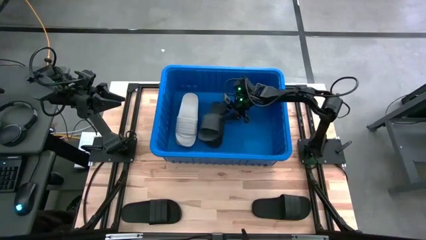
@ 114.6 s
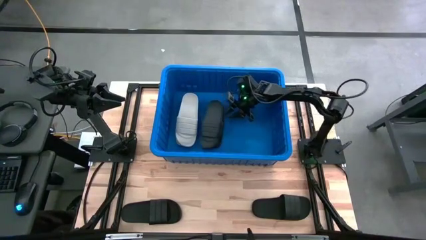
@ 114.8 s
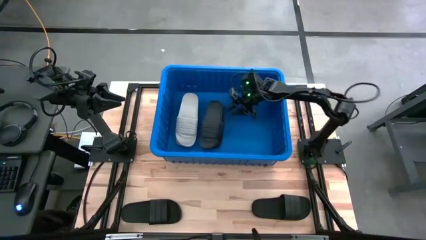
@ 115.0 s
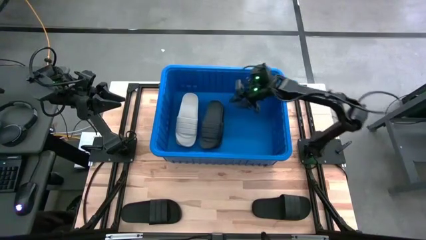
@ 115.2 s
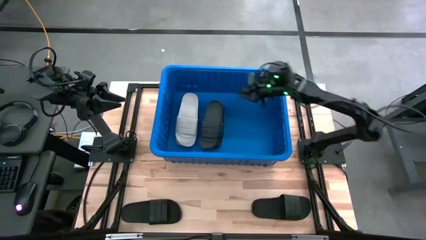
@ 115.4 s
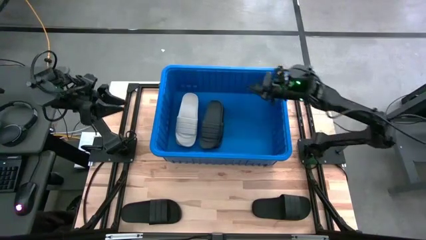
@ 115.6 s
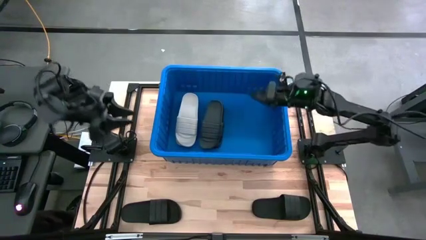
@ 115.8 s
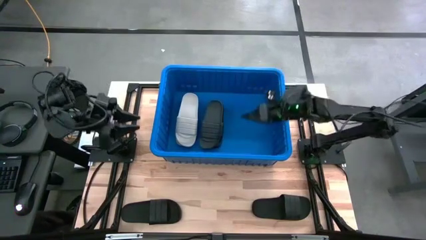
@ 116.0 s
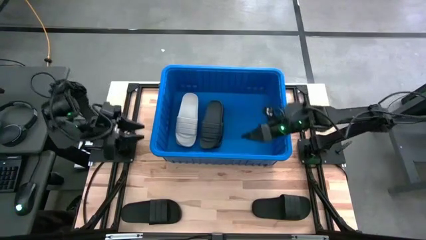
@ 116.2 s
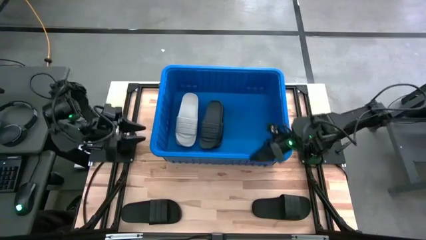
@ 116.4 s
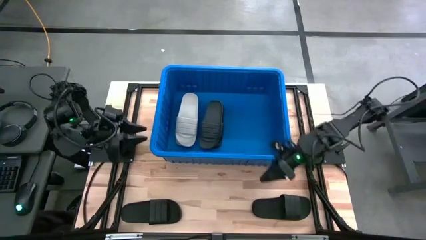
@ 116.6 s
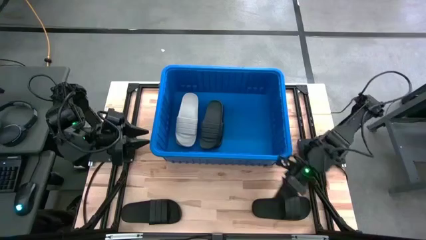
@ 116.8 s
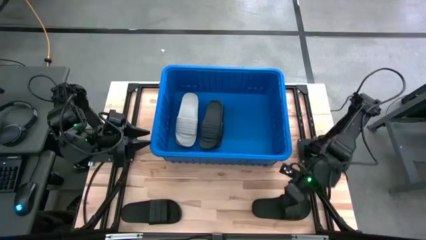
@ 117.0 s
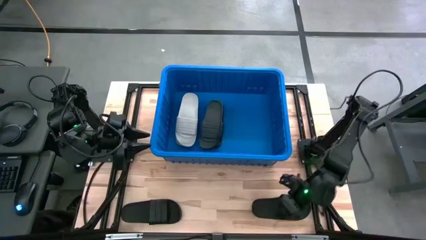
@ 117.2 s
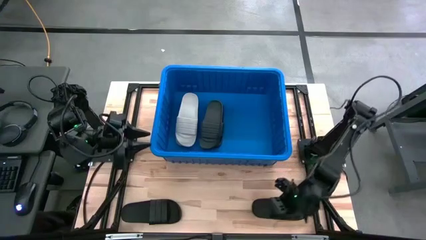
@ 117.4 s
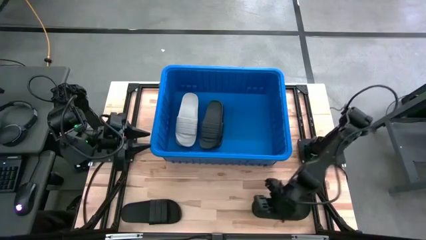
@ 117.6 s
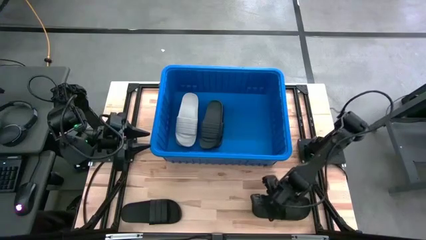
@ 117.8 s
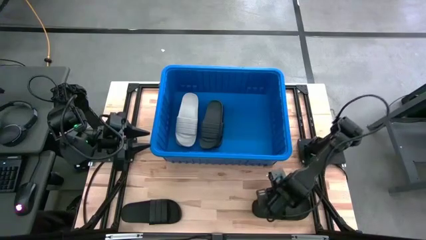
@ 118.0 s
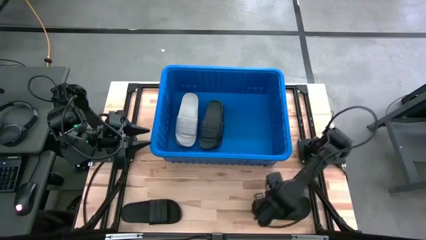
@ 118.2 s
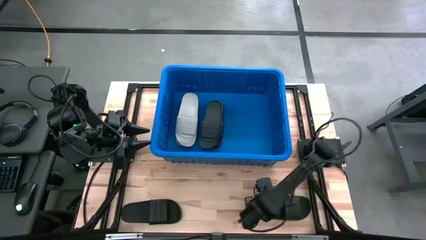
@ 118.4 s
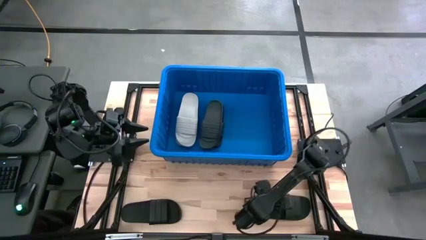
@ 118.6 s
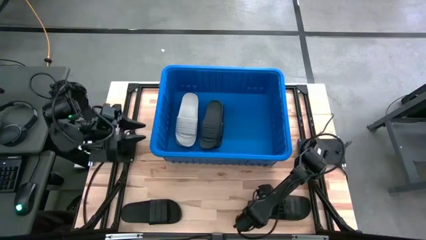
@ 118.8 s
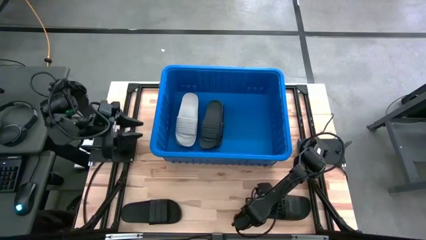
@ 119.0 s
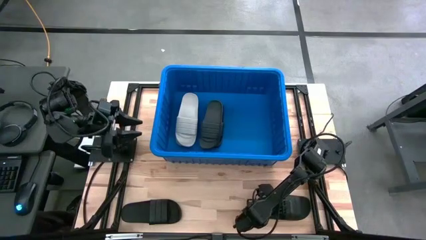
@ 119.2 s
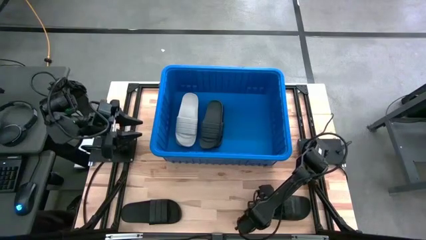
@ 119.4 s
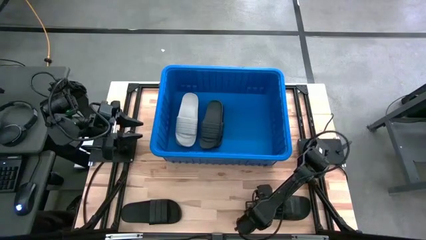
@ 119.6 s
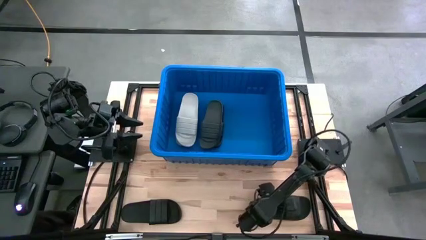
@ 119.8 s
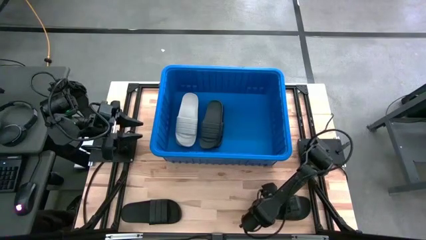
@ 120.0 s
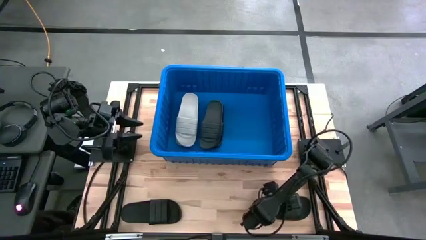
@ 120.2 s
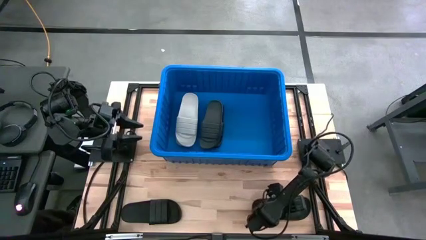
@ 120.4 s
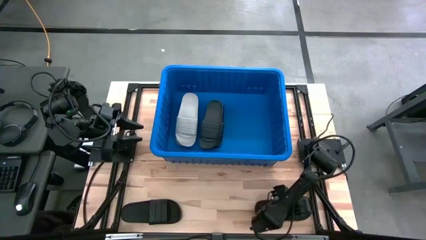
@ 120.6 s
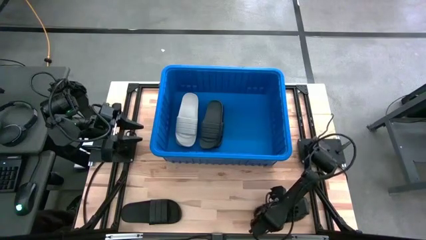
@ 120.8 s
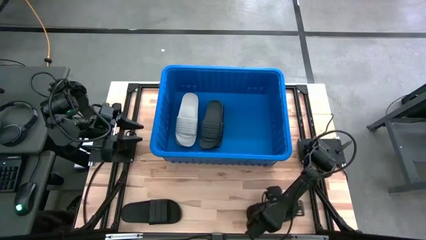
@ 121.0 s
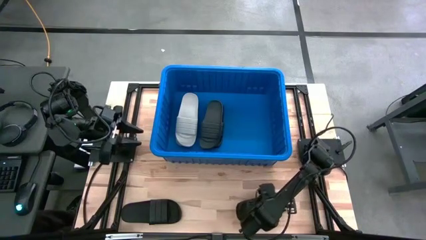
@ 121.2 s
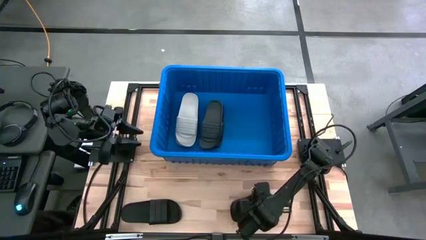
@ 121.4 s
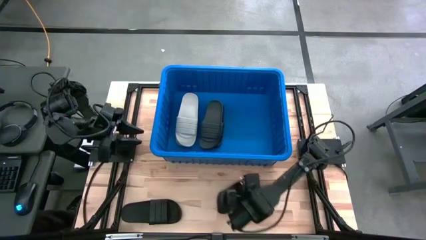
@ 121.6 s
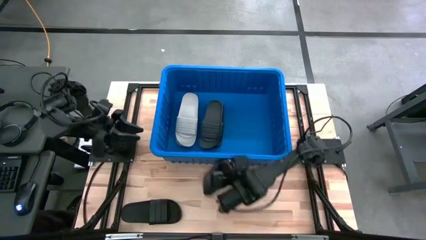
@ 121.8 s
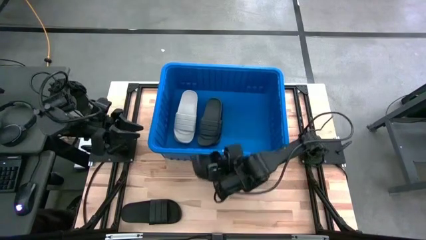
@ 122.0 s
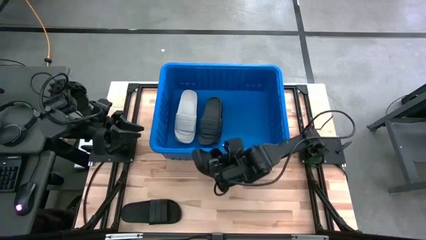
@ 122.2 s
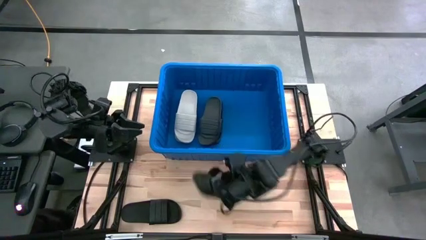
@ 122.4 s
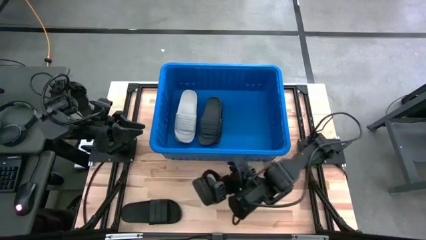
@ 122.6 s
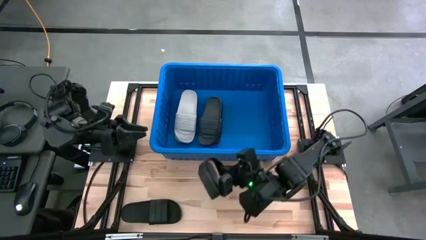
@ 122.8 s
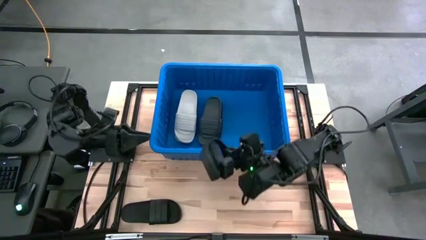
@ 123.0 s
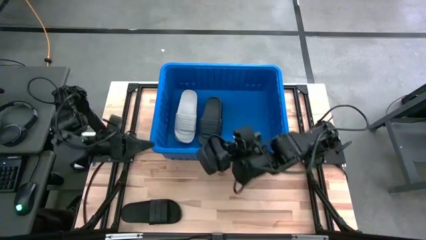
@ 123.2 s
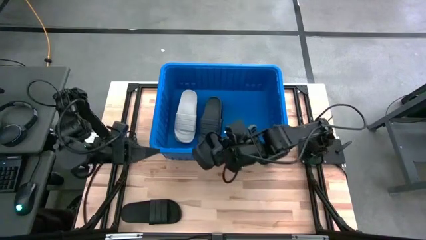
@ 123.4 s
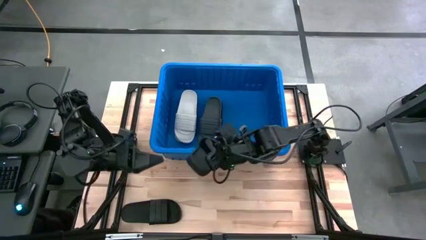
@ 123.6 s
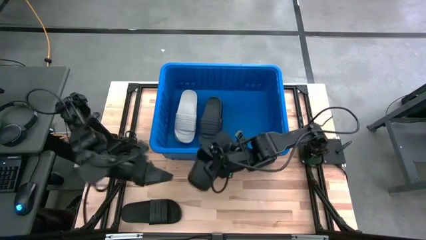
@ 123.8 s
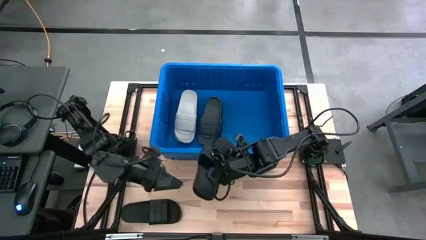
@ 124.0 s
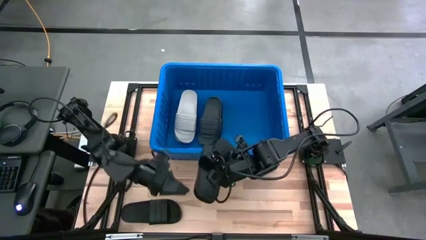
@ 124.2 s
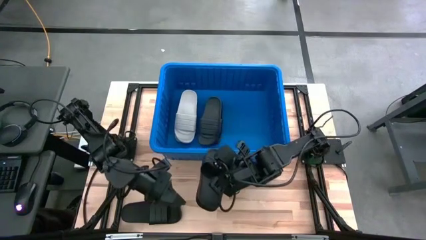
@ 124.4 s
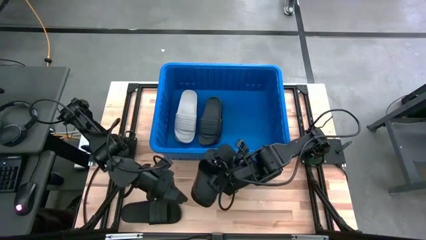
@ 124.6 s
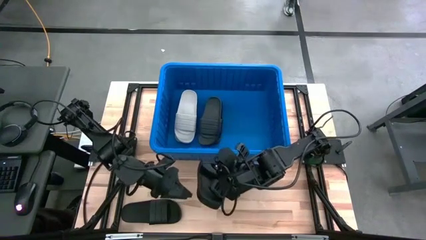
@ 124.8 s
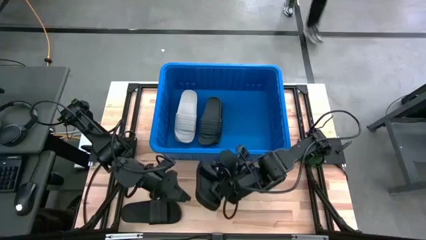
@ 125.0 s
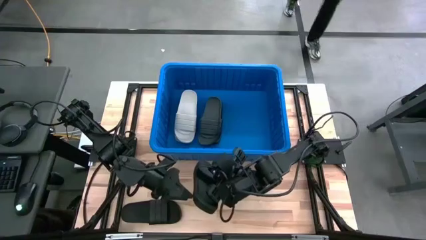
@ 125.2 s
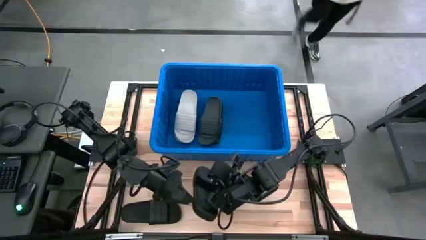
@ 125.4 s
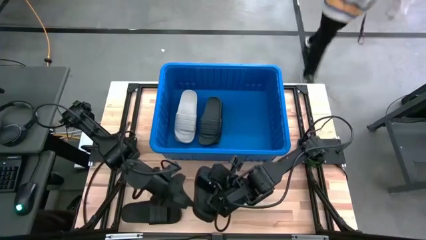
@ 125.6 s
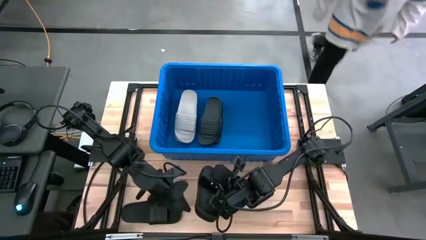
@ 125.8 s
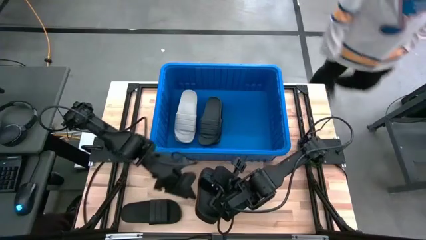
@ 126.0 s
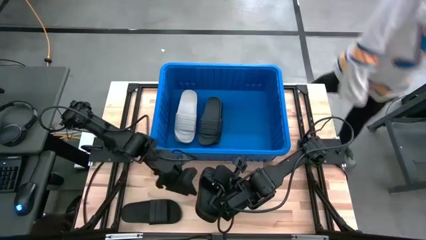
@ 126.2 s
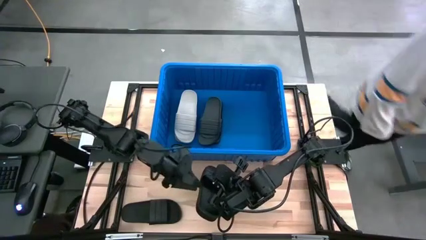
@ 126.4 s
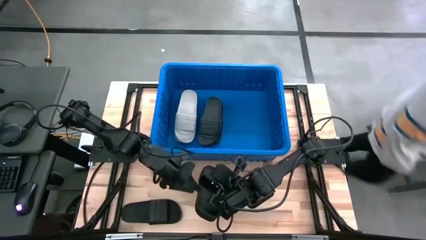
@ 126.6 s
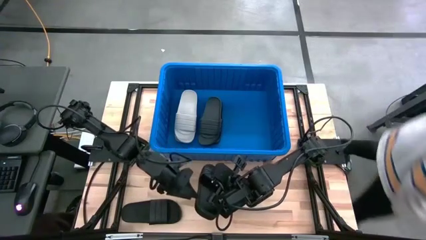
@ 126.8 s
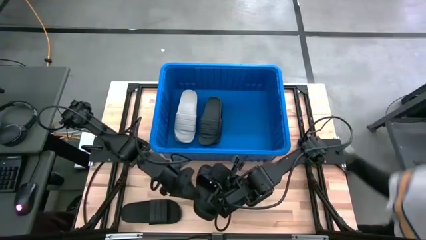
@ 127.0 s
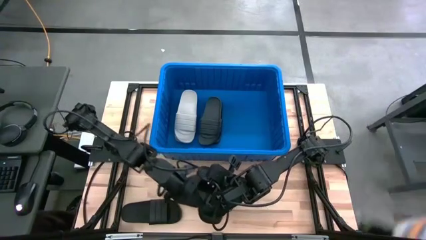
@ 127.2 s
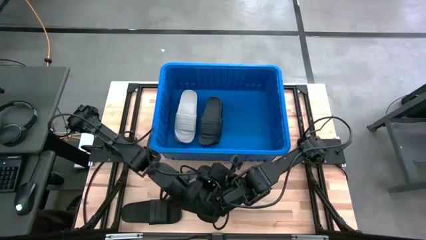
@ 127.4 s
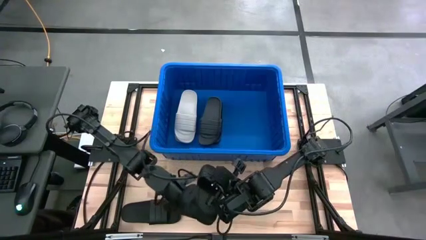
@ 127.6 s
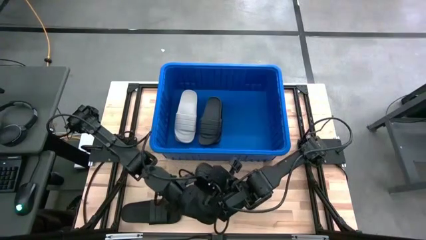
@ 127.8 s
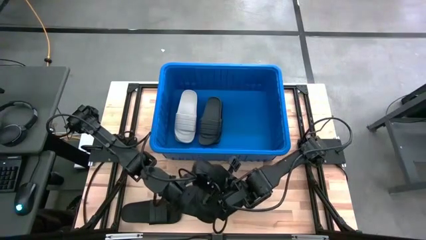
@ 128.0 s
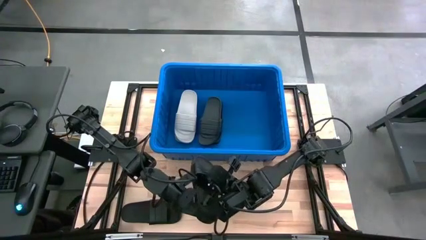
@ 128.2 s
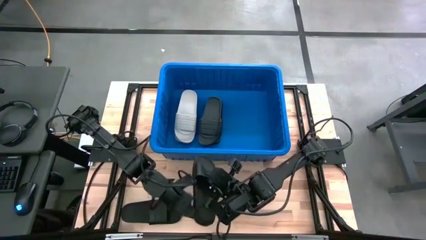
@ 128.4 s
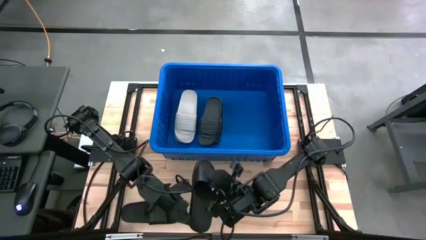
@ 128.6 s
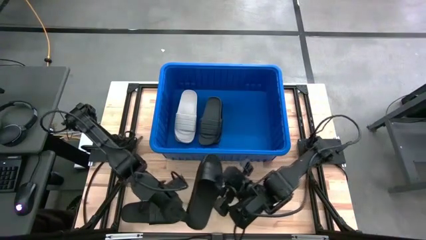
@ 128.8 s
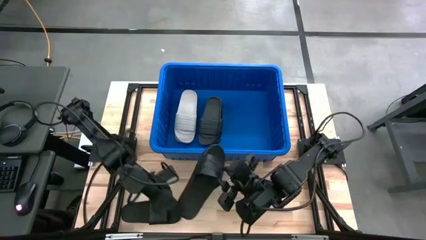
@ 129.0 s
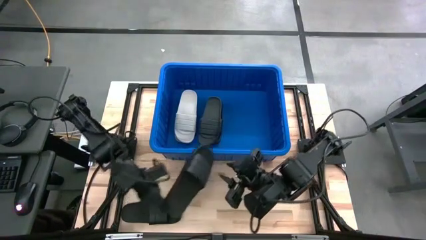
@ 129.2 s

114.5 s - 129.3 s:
Task: Pick and place slides into bin
Put the black slide into the blue bin
